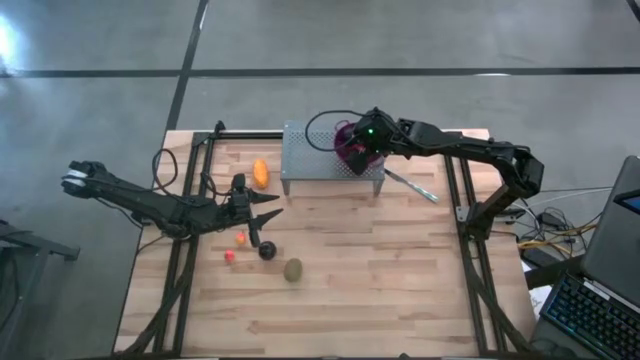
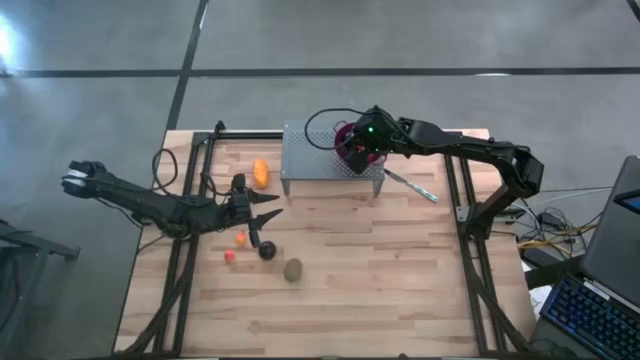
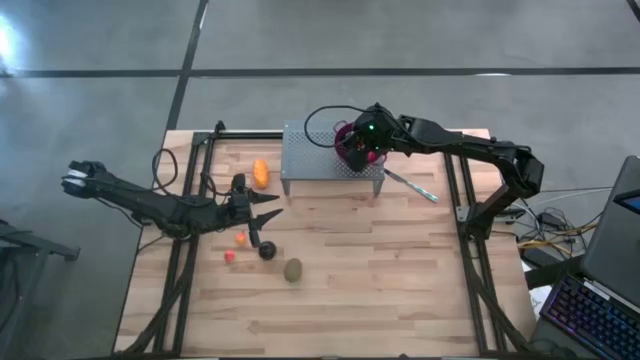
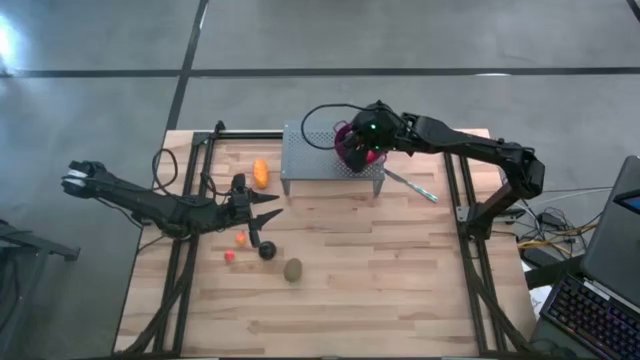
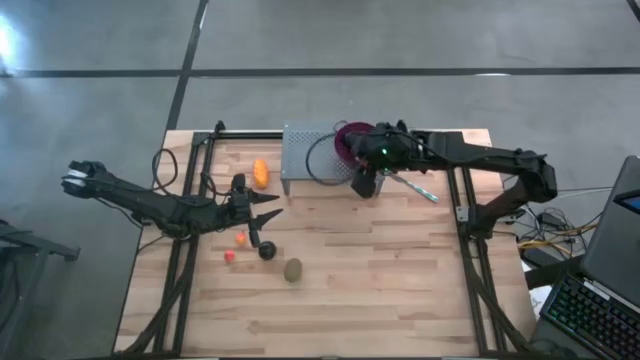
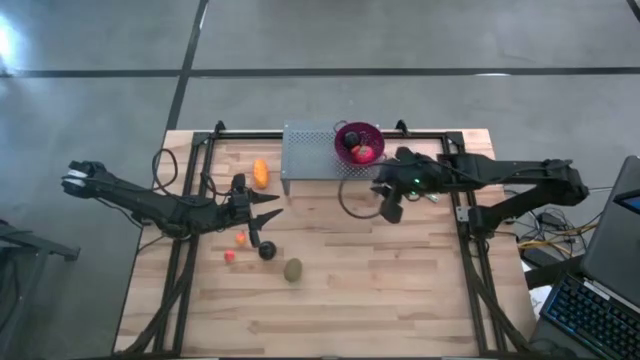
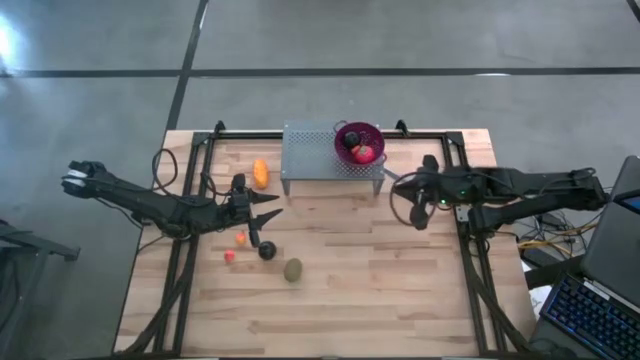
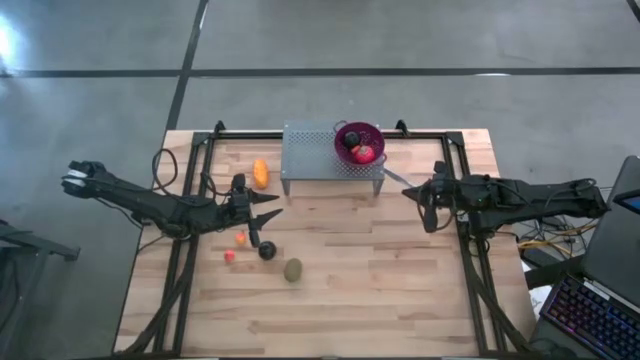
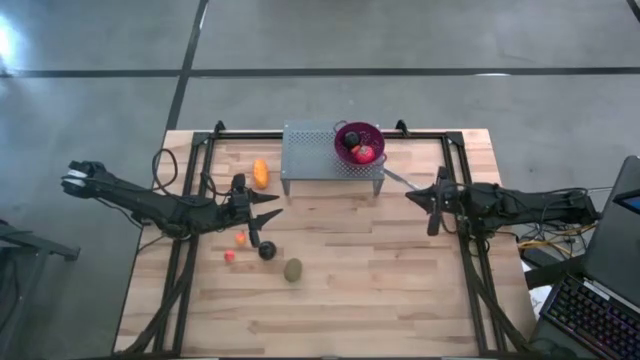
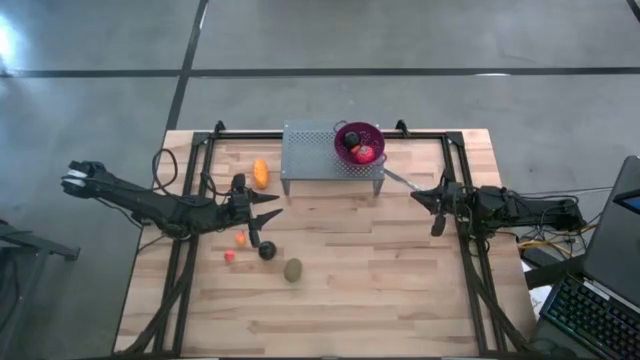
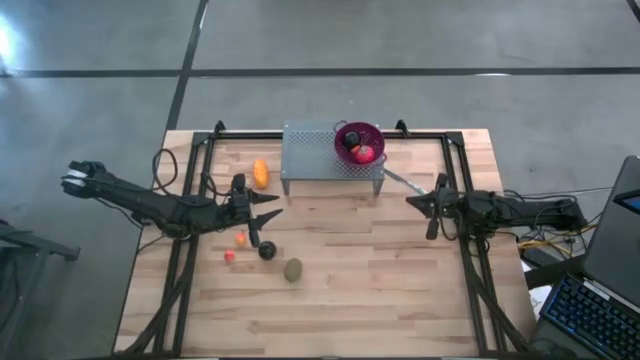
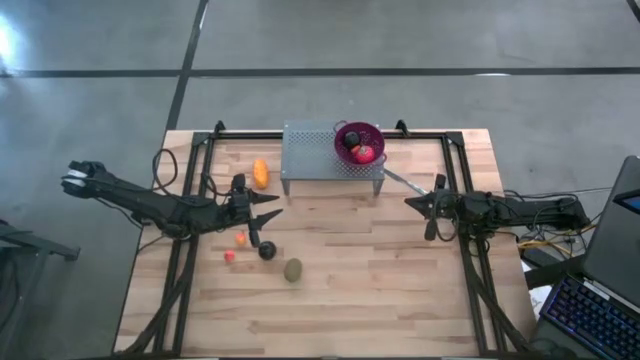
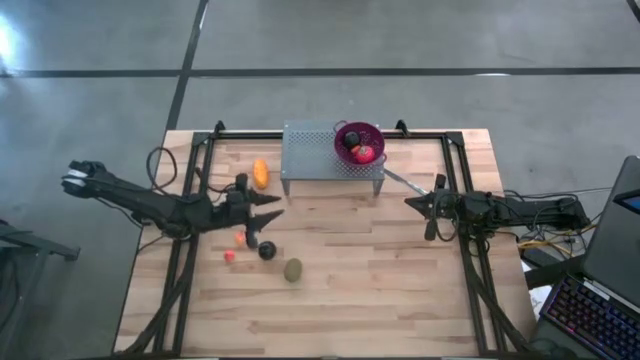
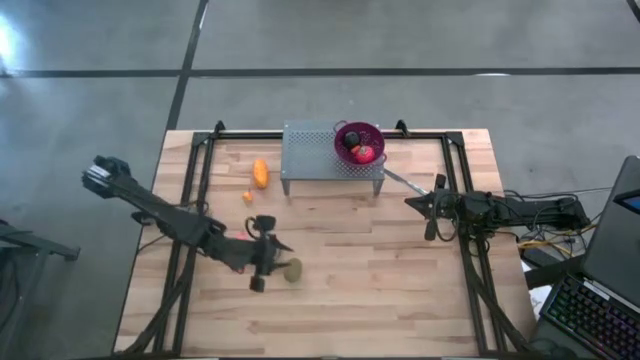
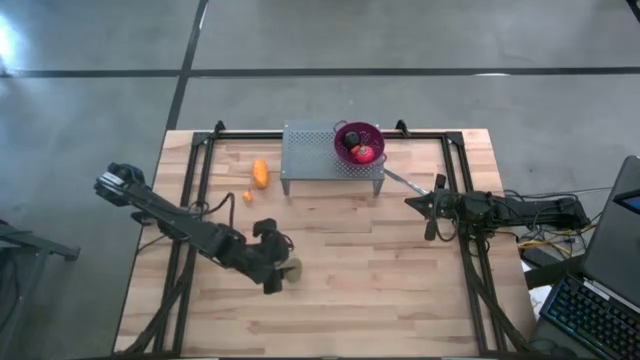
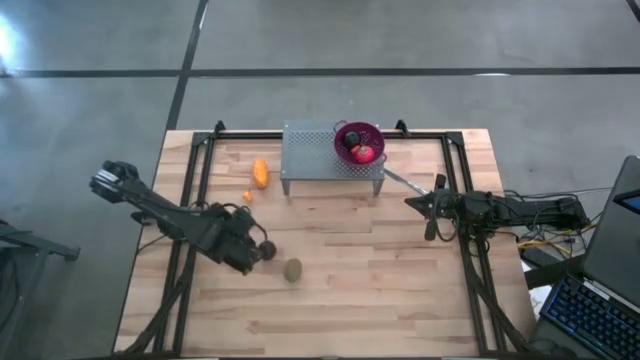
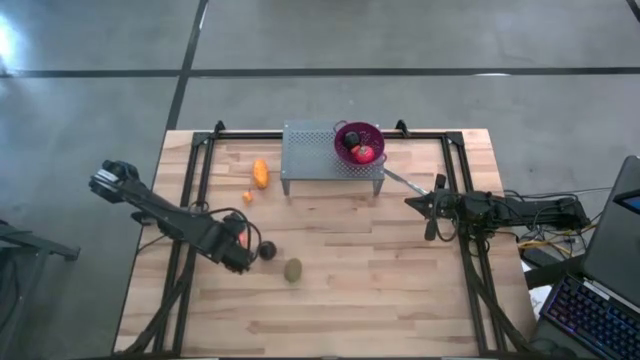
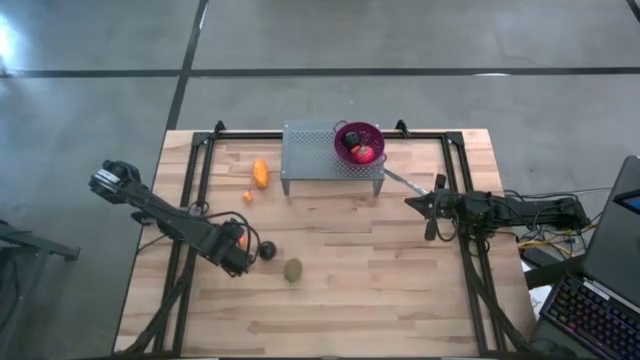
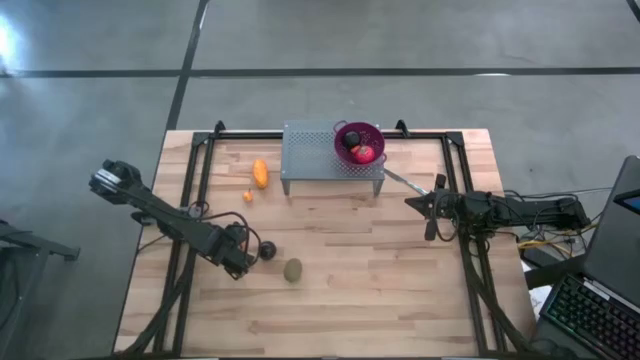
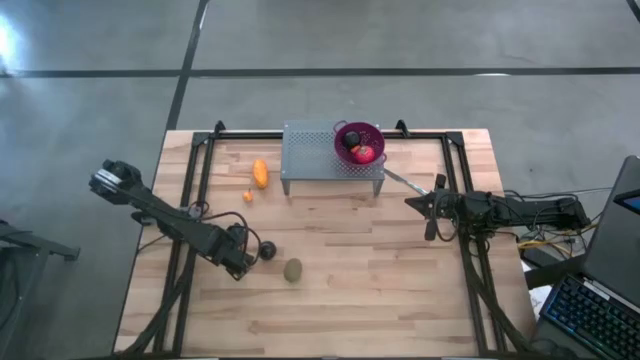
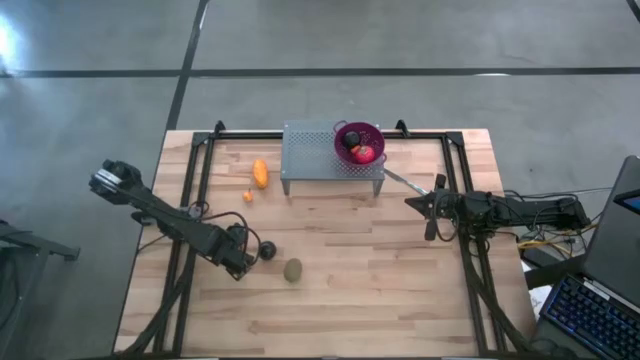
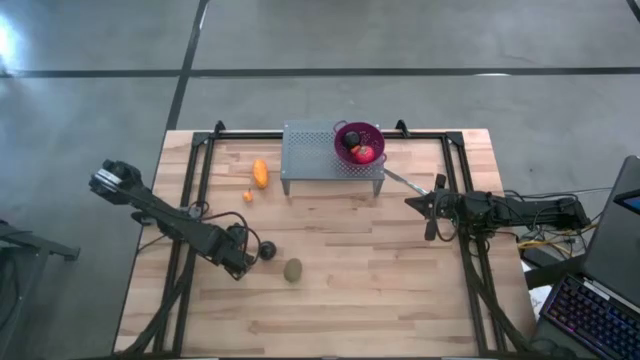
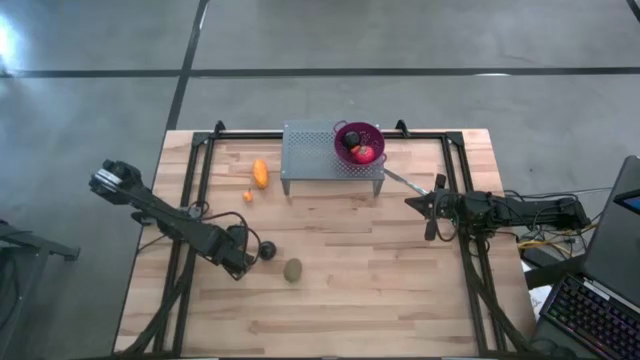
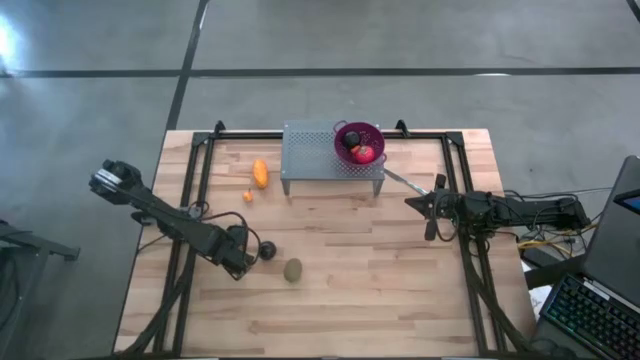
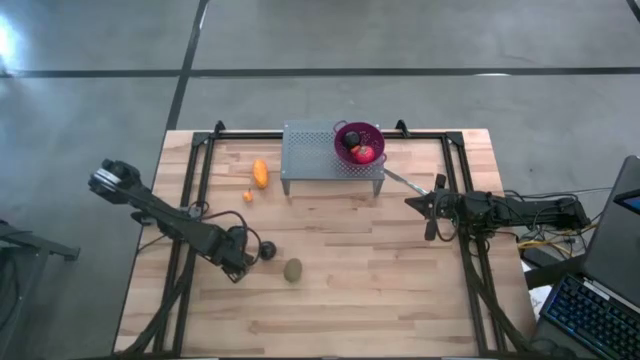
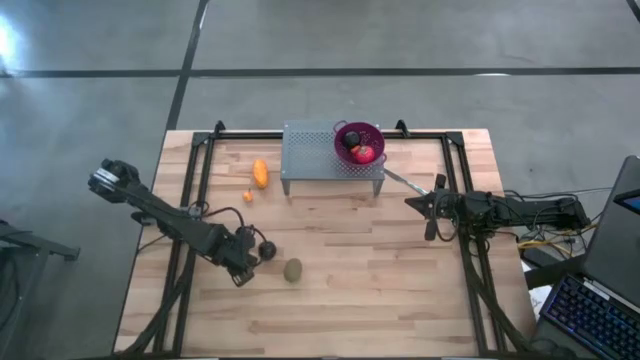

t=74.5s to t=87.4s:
Task: Pick & Place Fruit
Put the pear into the purple strainer bowl on the shelf

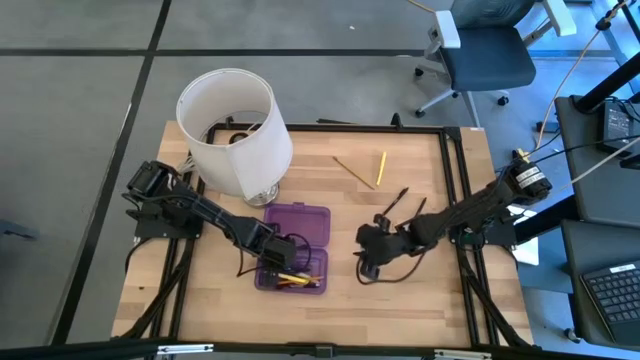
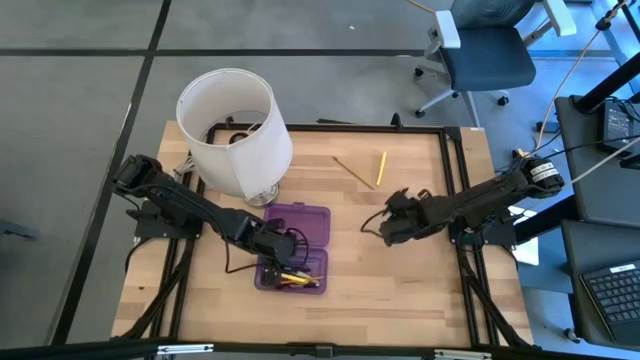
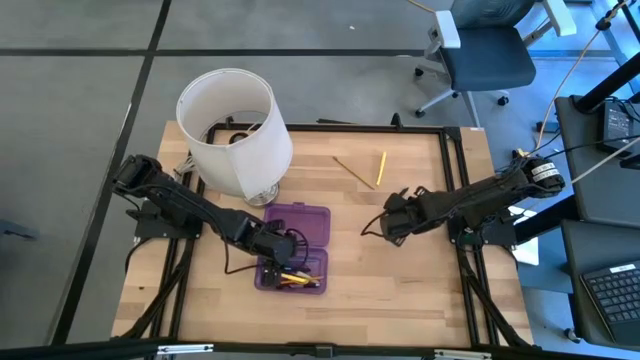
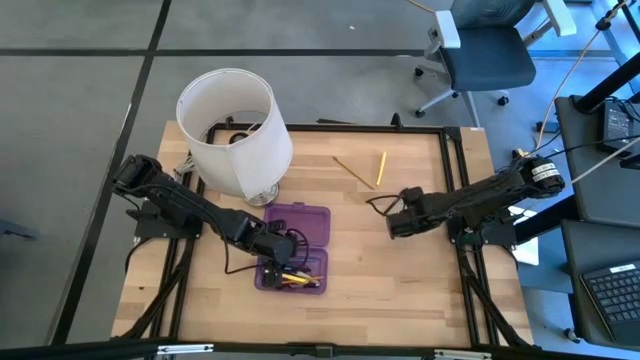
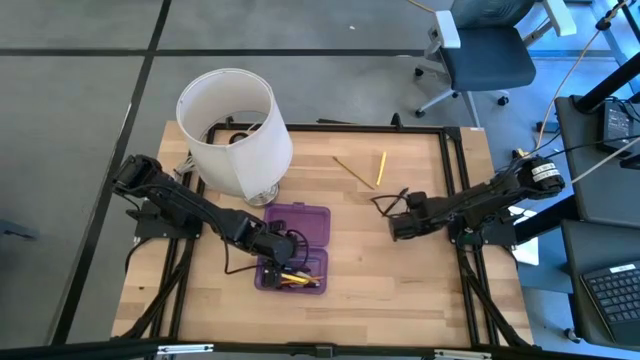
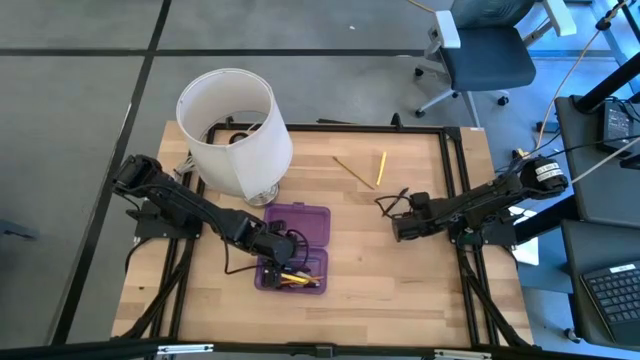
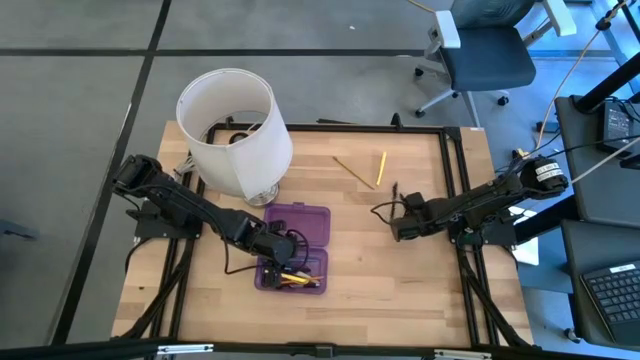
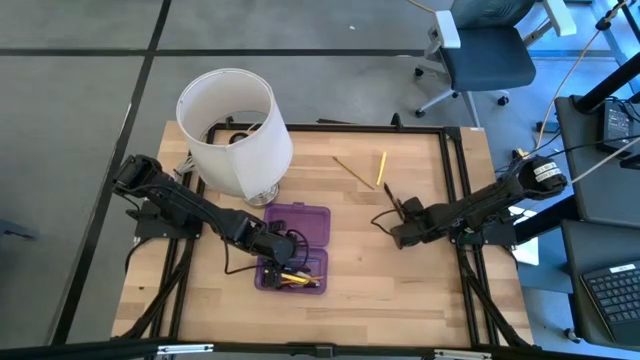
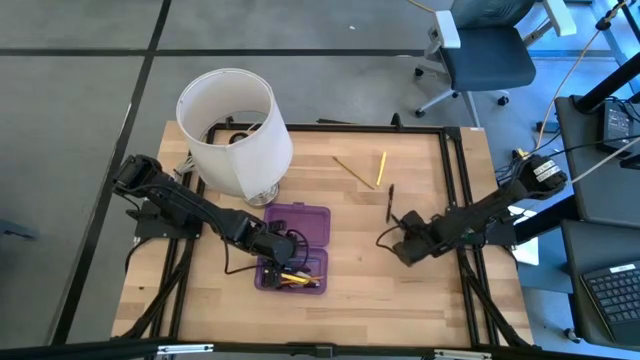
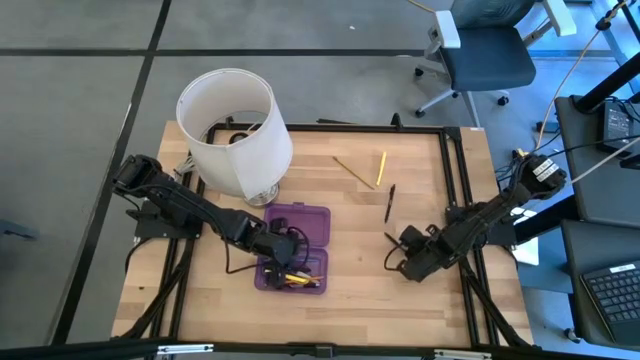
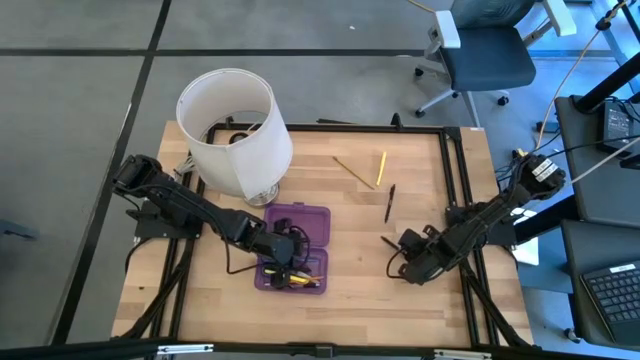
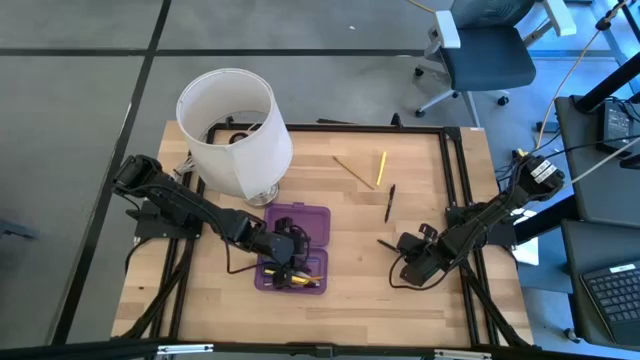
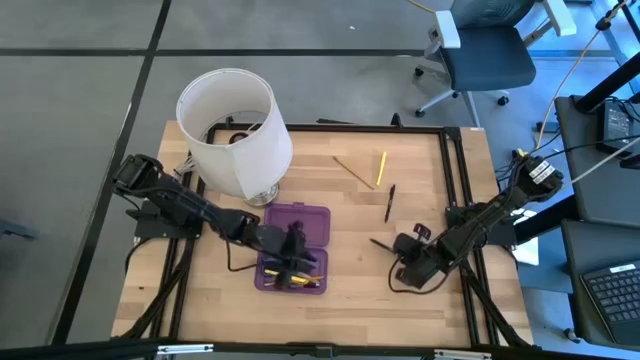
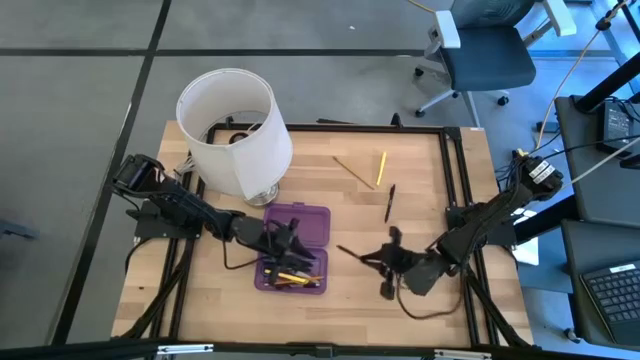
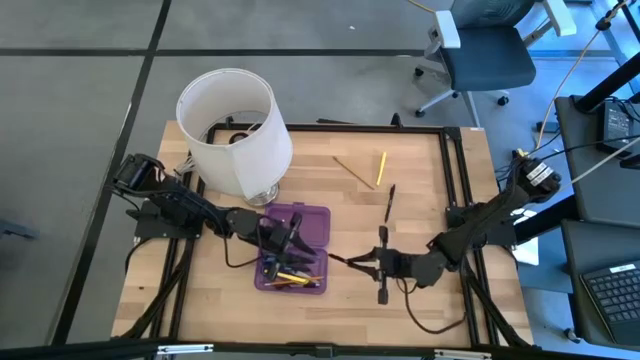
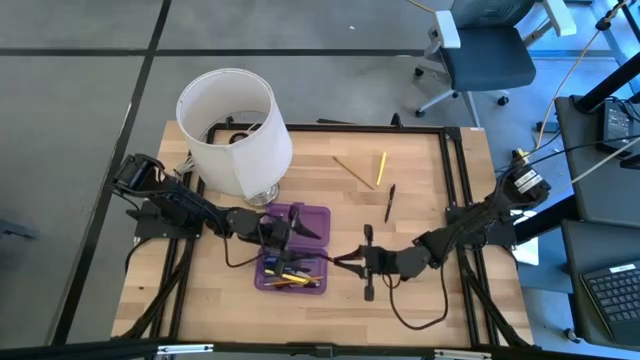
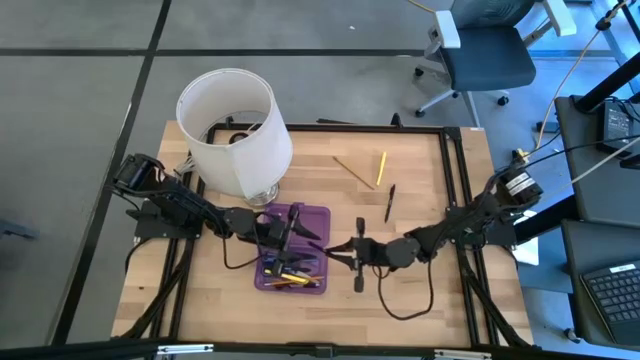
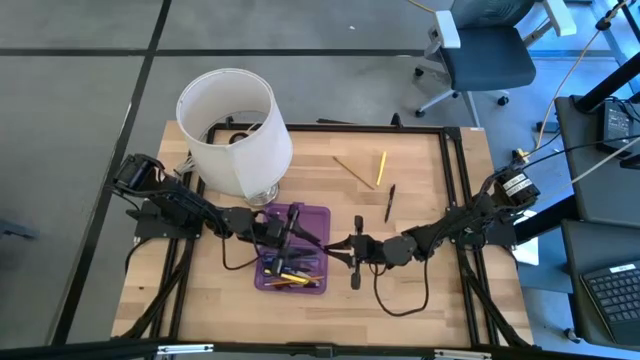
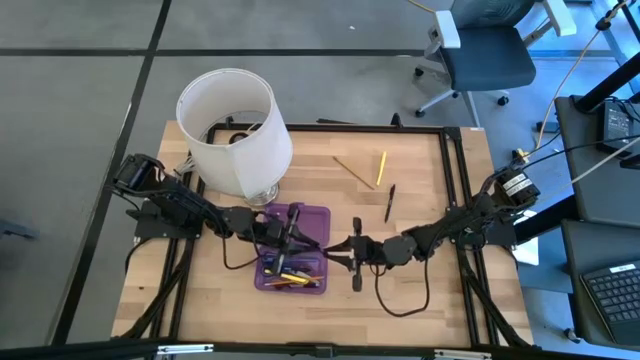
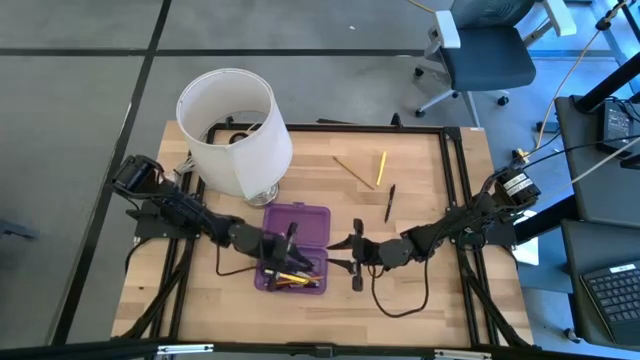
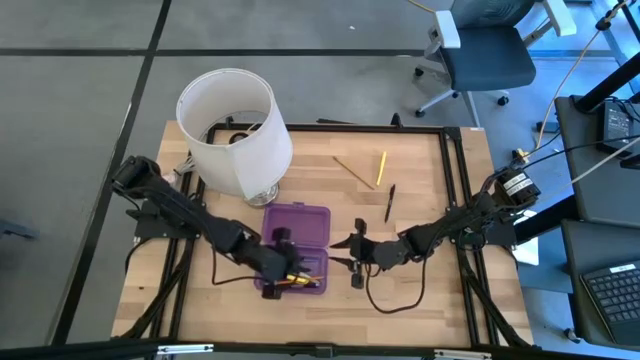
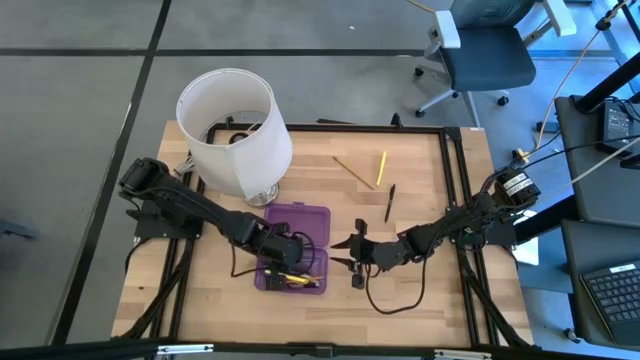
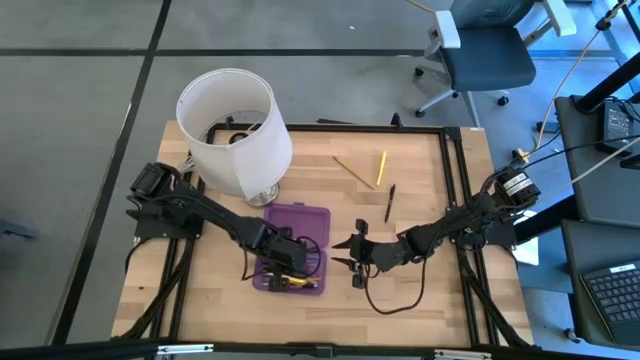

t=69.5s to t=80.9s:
Task: Pick & place school supplies into a supply box
Put the black pen into the purple supply box
